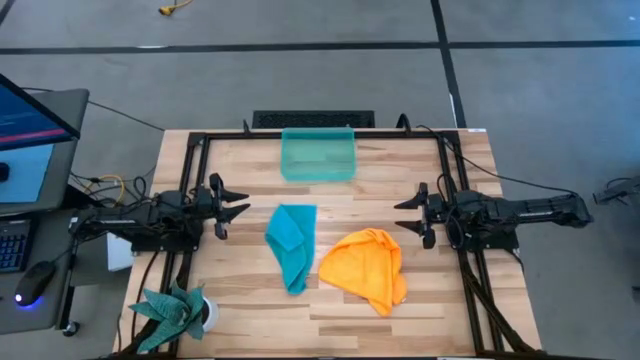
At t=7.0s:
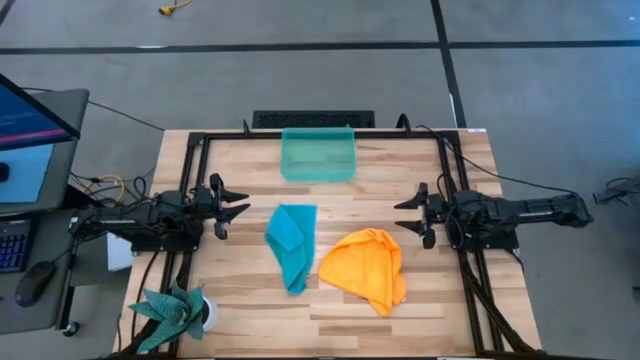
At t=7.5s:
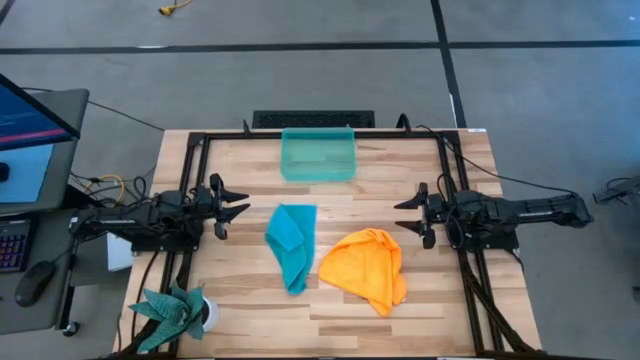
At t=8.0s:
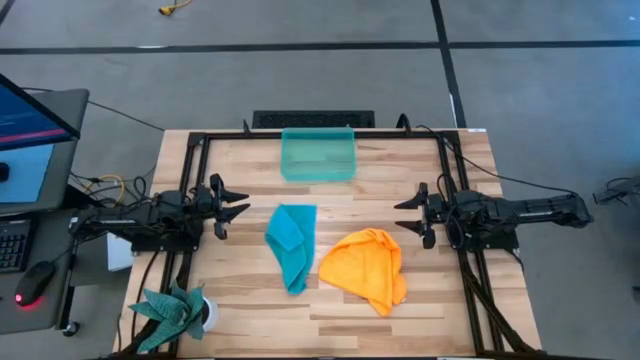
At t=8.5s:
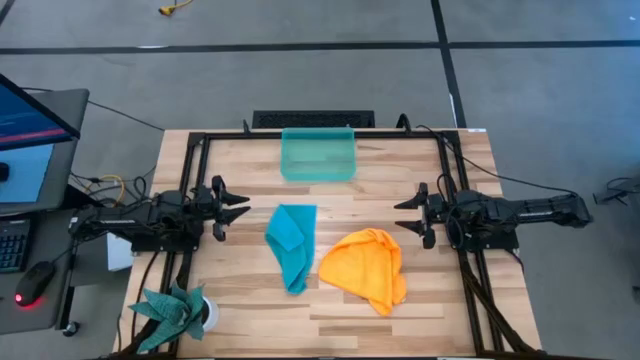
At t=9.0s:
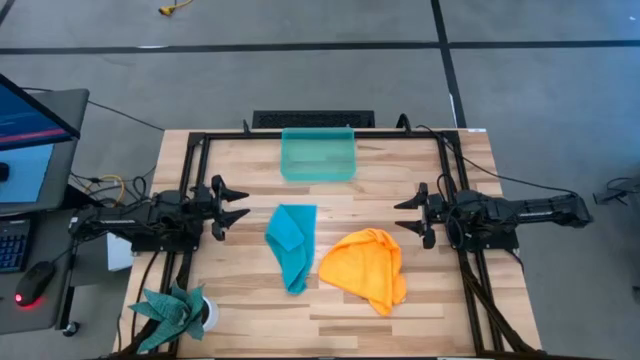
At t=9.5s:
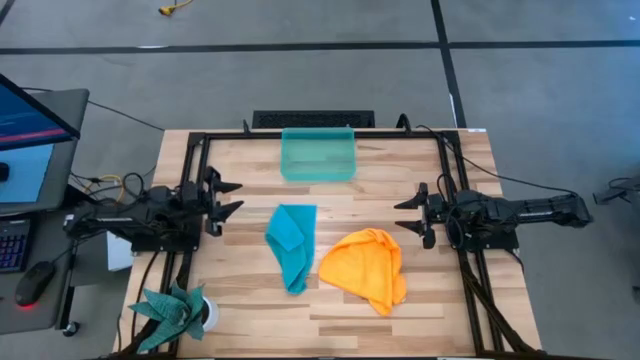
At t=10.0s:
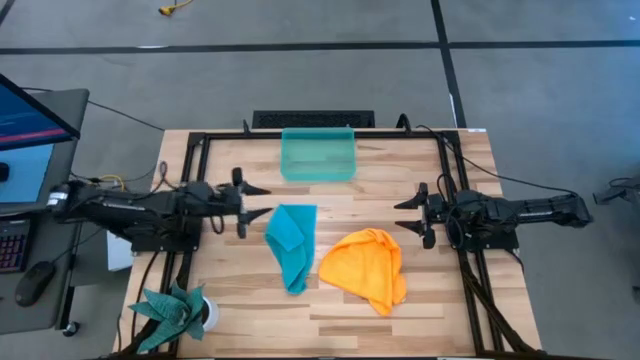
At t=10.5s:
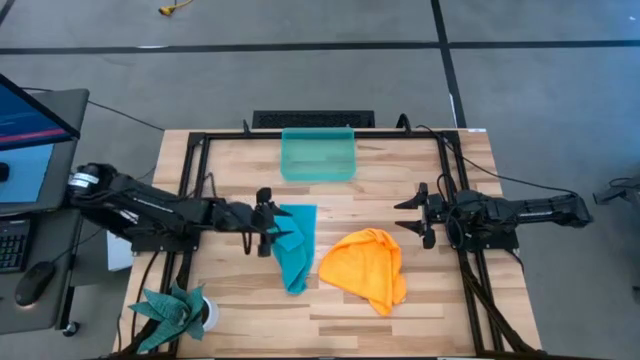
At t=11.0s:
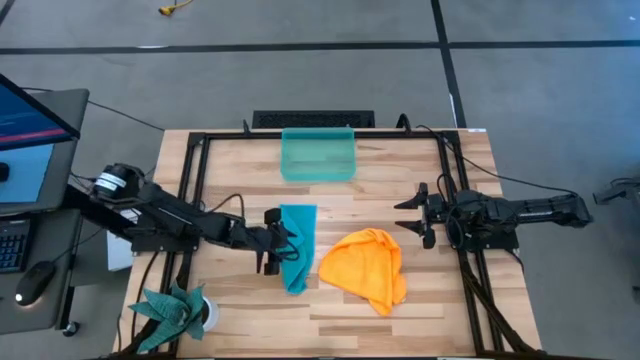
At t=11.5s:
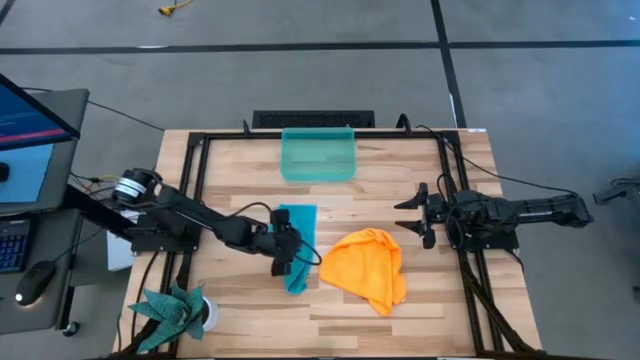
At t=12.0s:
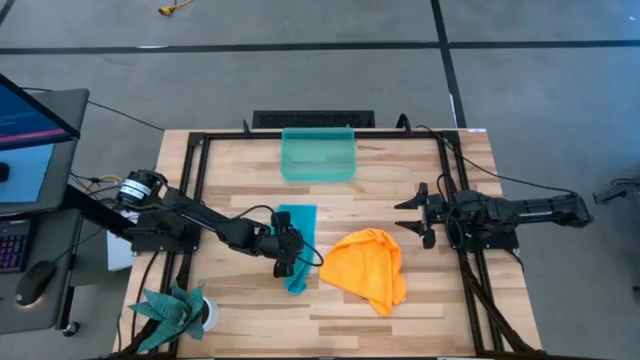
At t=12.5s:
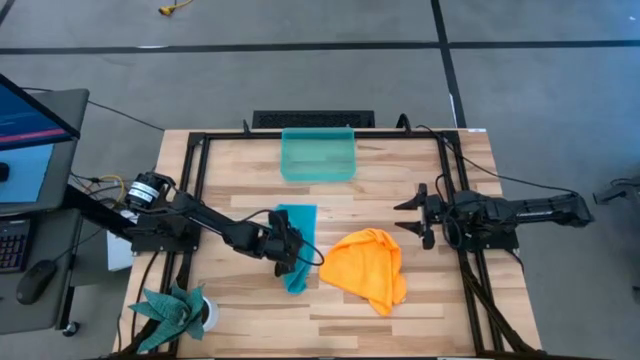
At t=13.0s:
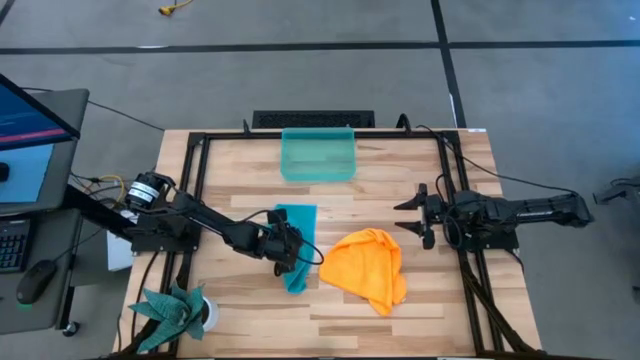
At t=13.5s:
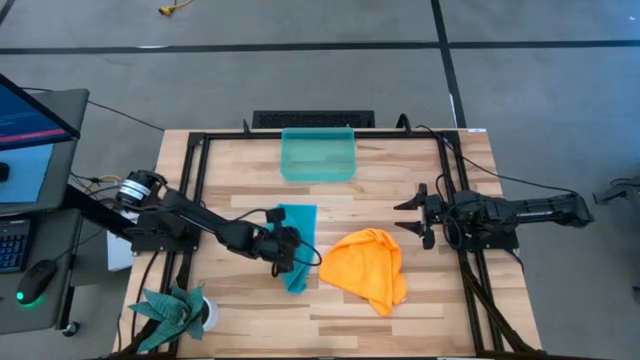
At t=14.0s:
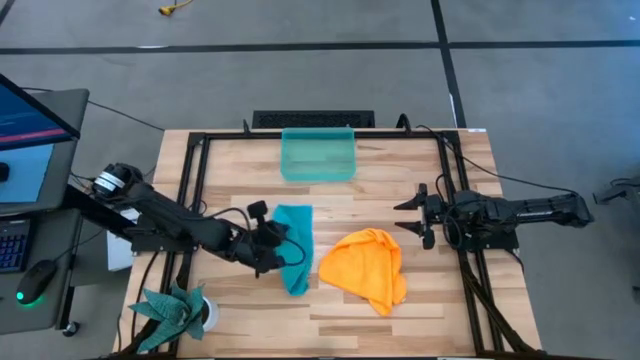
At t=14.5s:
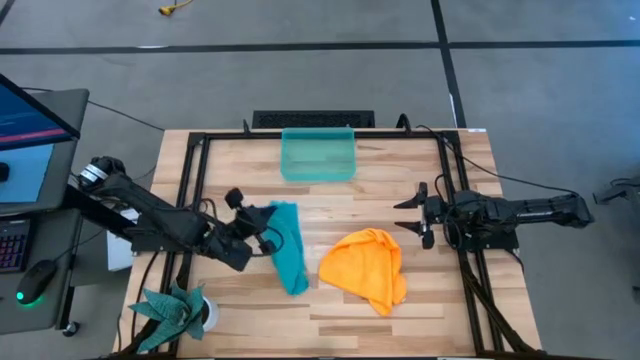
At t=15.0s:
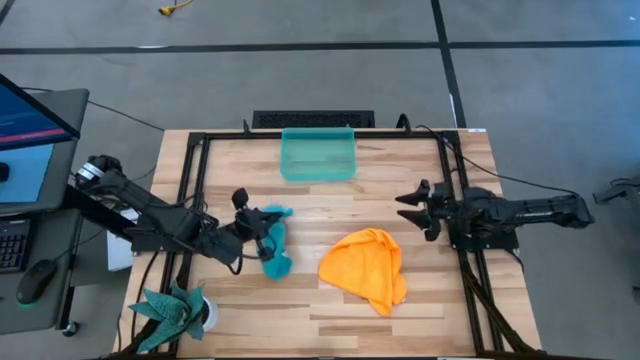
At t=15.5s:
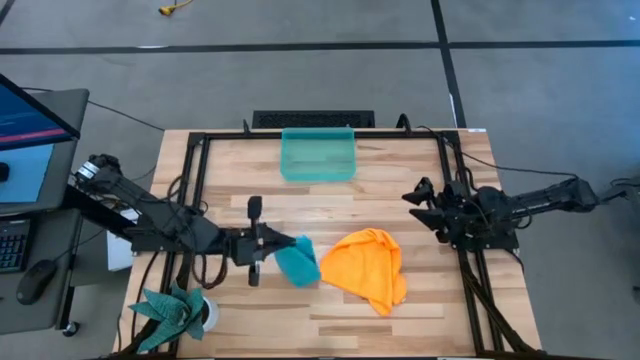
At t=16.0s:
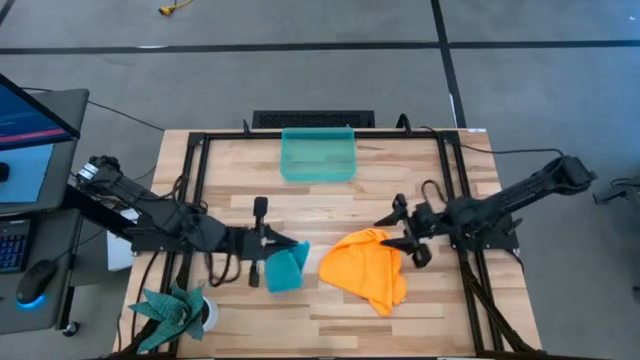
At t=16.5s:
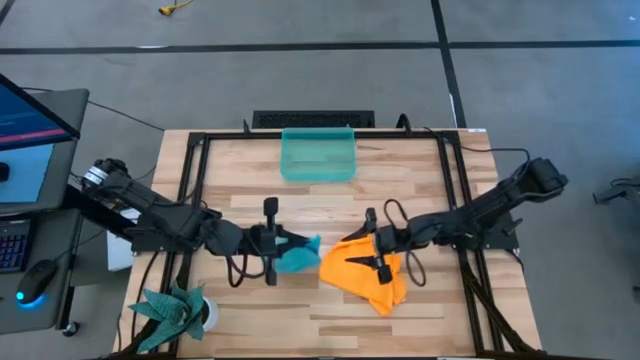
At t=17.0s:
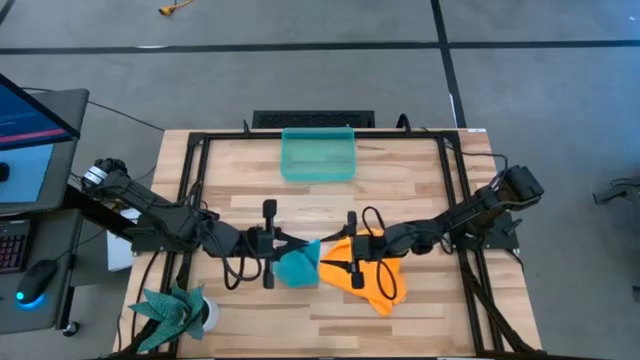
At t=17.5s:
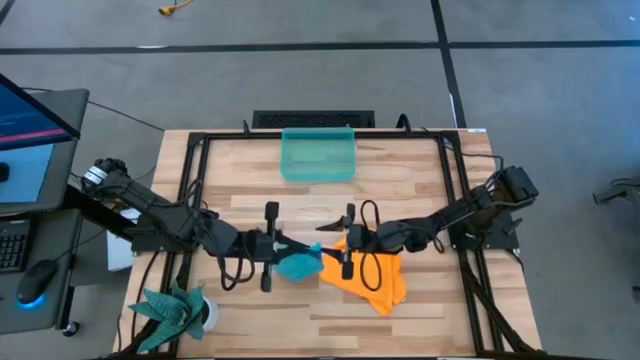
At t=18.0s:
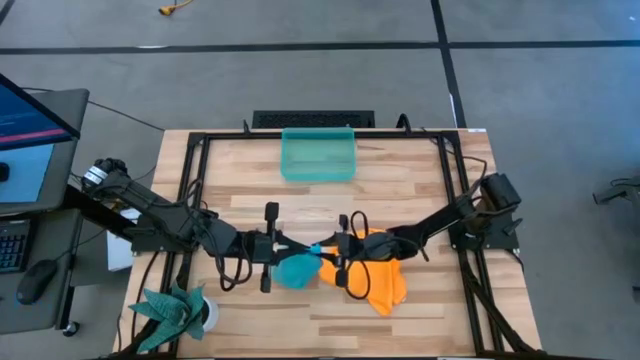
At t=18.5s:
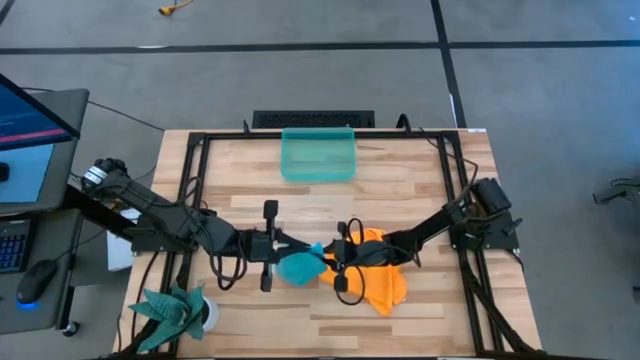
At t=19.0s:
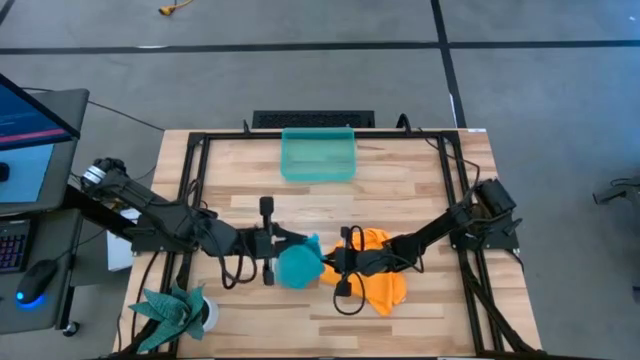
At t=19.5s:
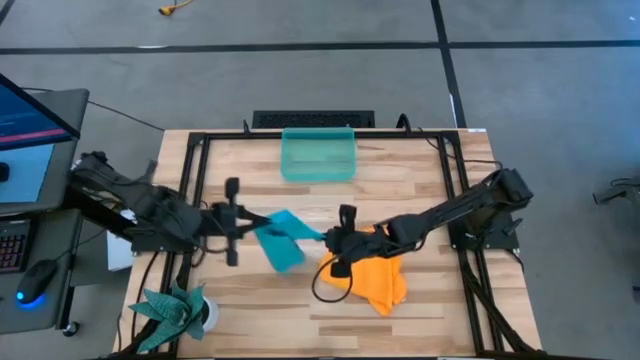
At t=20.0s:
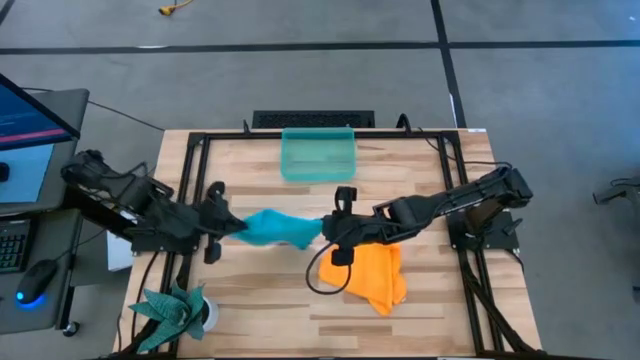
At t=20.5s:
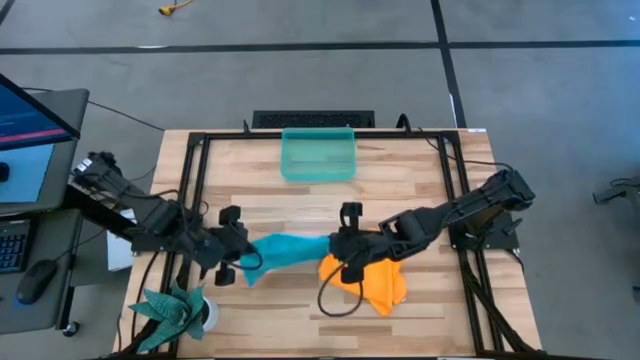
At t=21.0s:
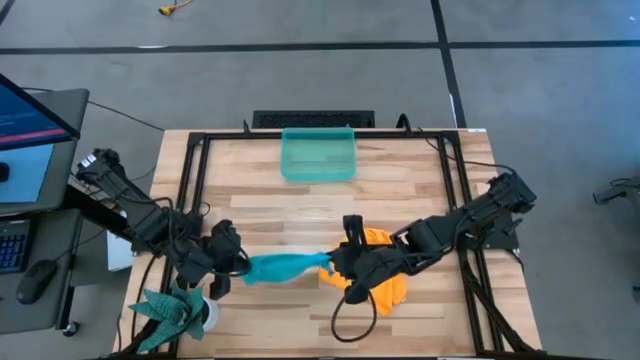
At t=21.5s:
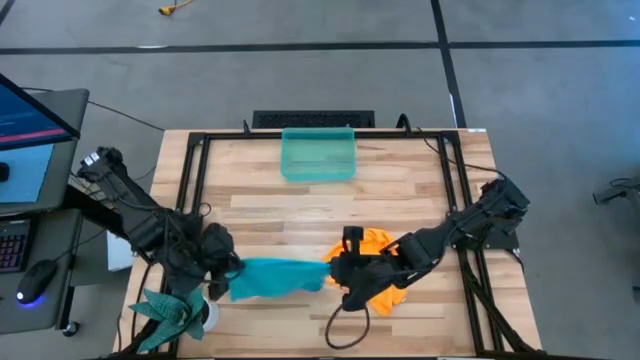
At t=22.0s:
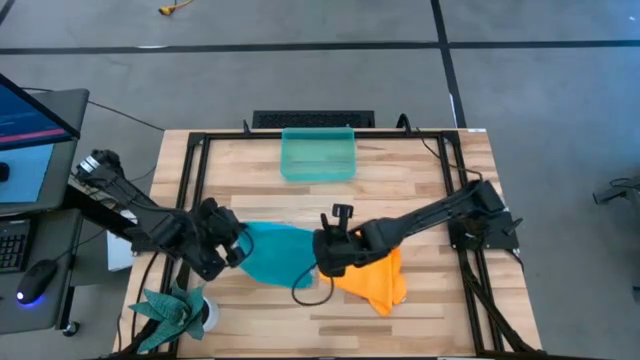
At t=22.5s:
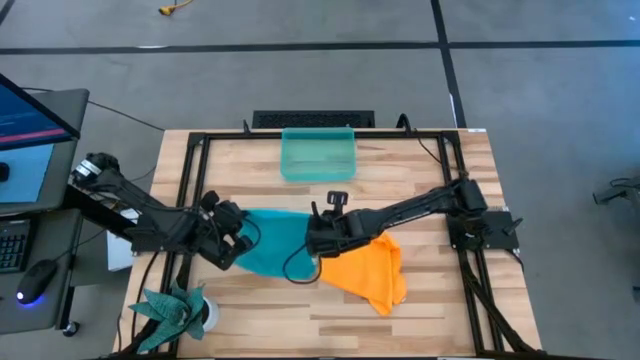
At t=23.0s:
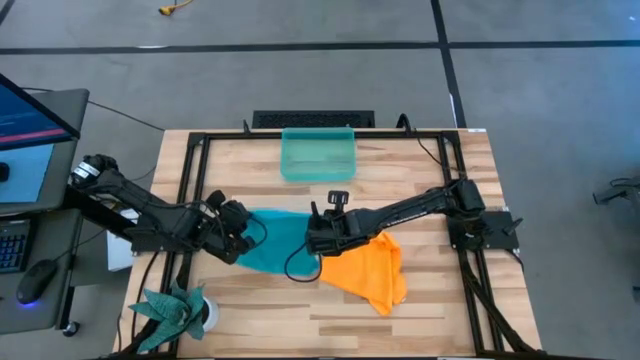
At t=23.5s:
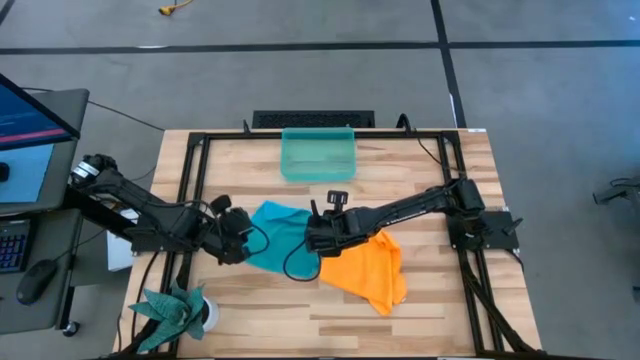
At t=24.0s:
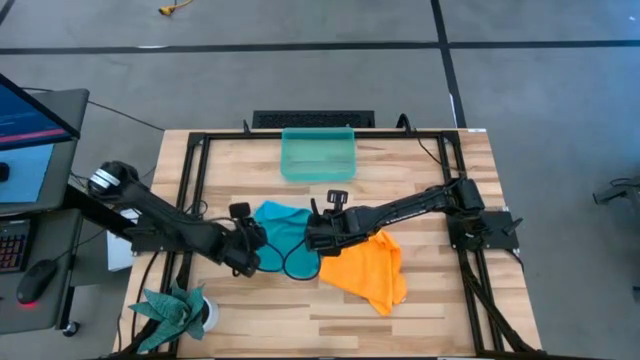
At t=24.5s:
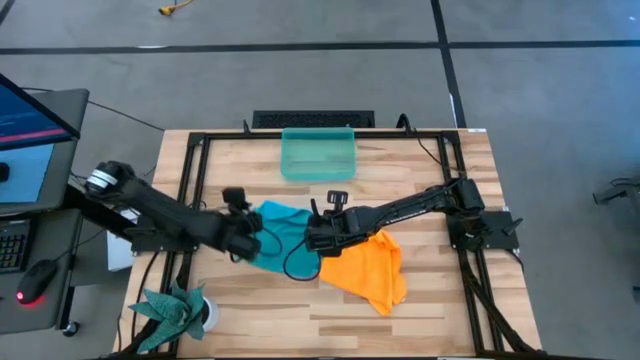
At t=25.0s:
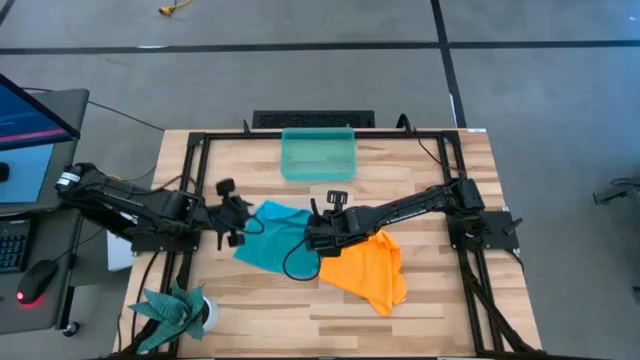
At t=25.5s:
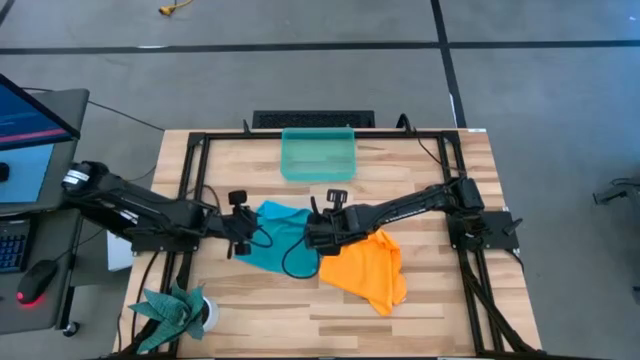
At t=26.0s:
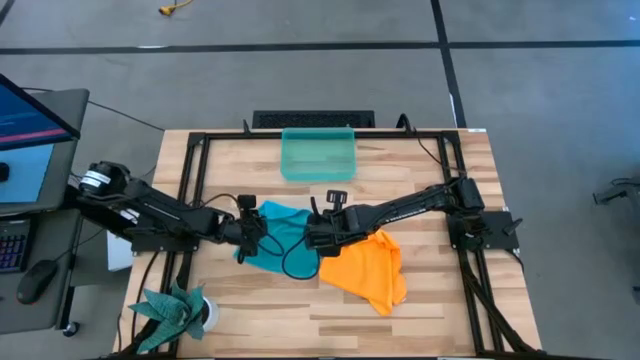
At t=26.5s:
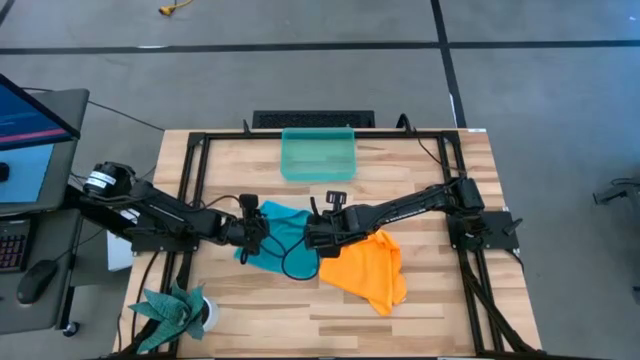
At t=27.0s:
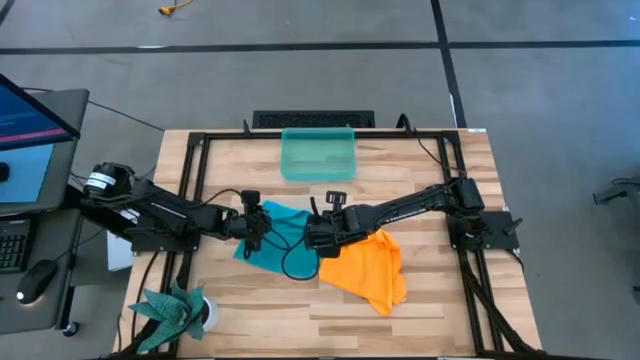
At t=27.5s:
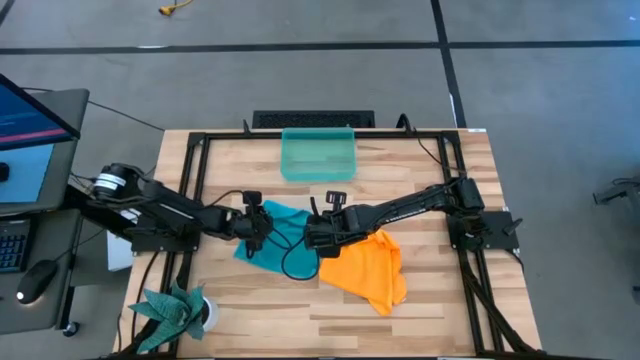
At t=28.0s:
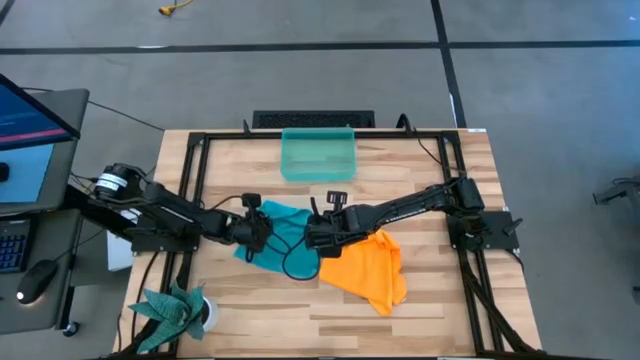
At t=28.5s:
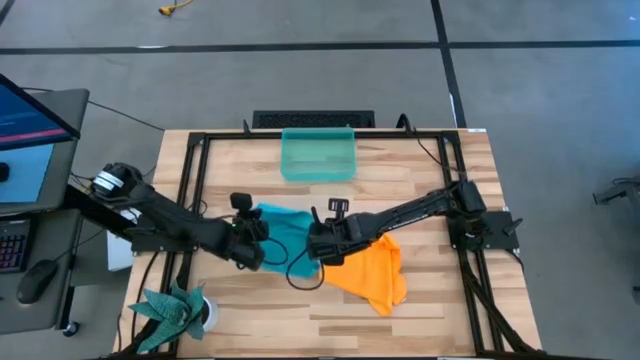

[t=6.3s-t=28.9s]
Task: Roll microfiber towels into tight, uniform cylinder then place into a basket
Fold the blue microfiber cloth
